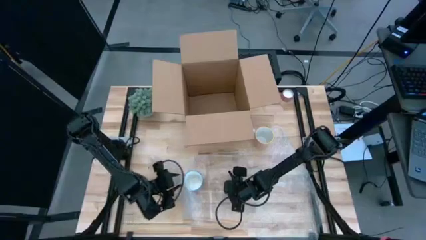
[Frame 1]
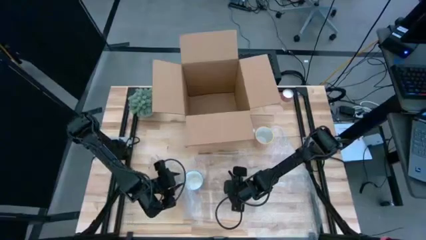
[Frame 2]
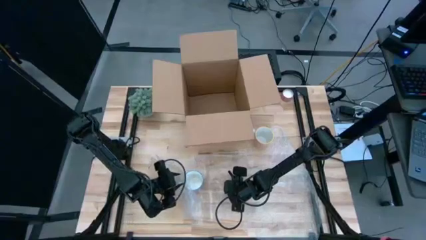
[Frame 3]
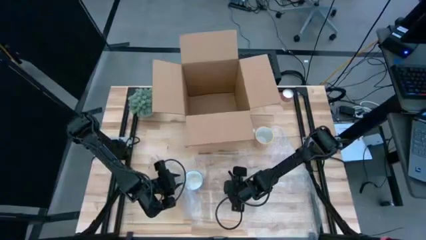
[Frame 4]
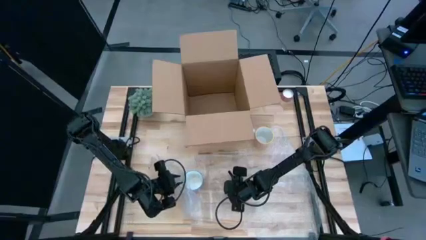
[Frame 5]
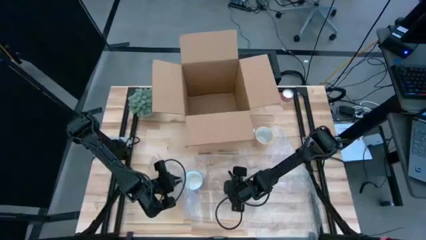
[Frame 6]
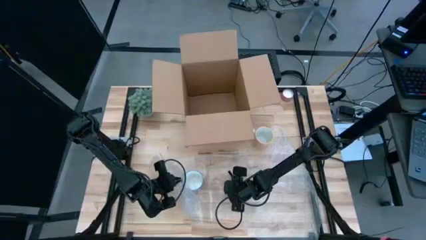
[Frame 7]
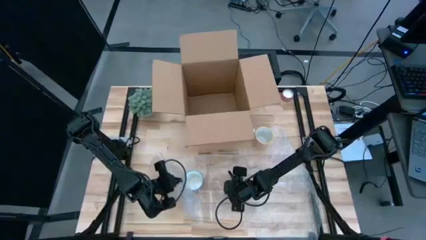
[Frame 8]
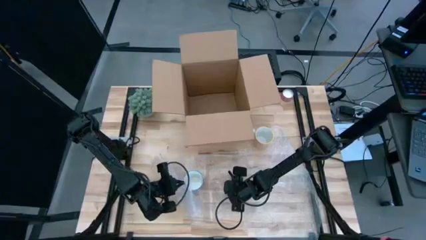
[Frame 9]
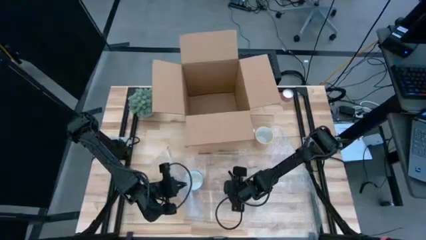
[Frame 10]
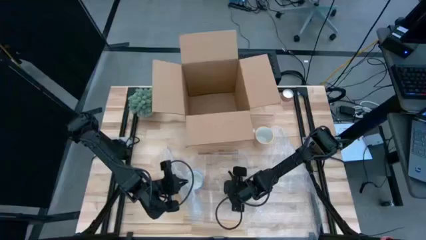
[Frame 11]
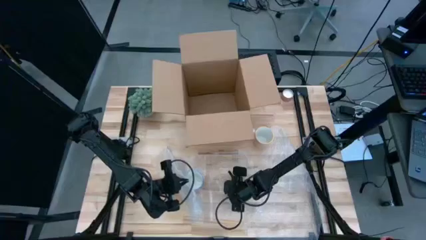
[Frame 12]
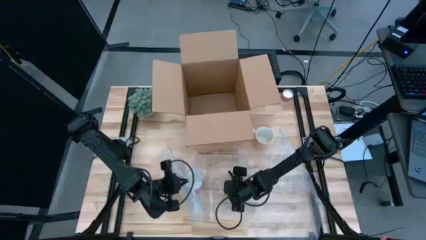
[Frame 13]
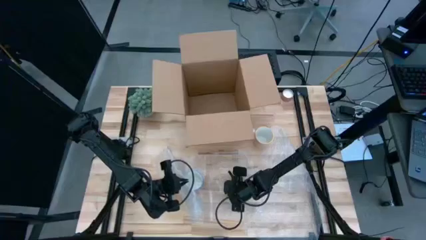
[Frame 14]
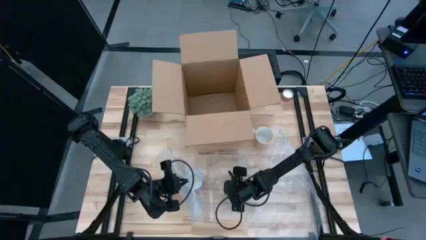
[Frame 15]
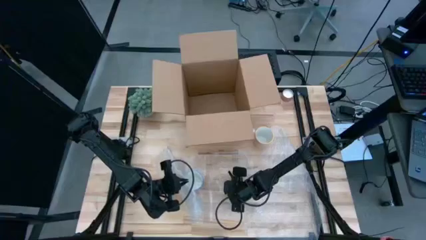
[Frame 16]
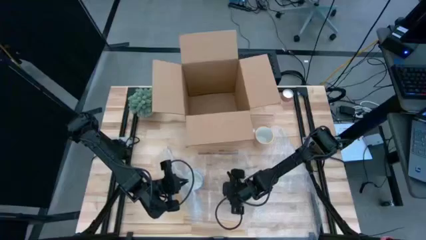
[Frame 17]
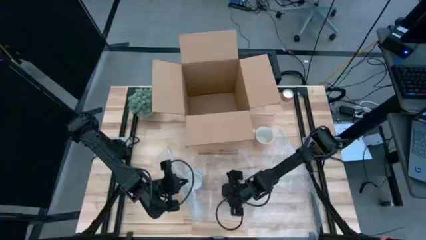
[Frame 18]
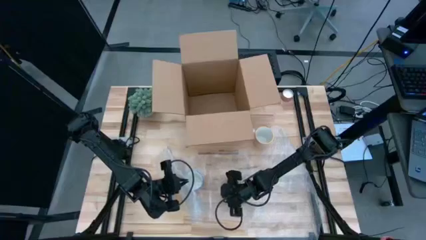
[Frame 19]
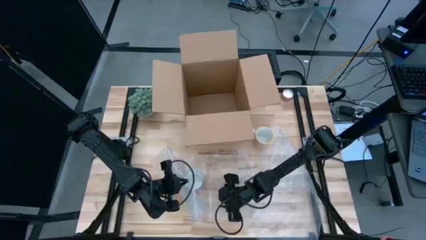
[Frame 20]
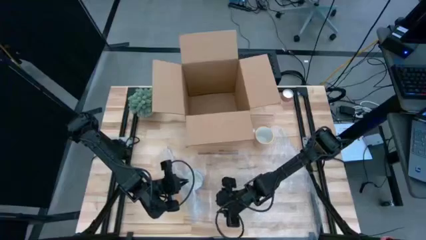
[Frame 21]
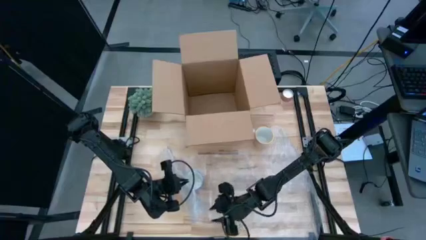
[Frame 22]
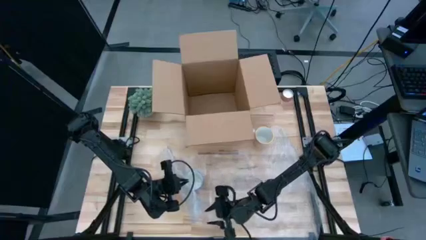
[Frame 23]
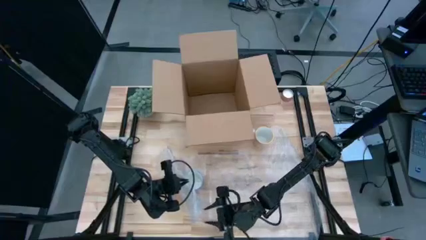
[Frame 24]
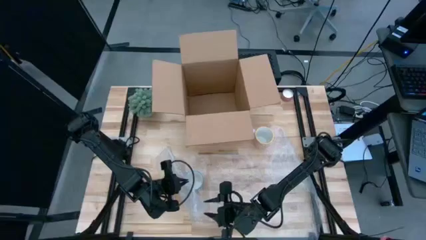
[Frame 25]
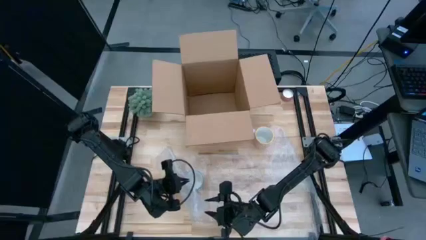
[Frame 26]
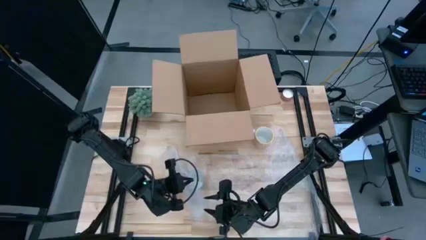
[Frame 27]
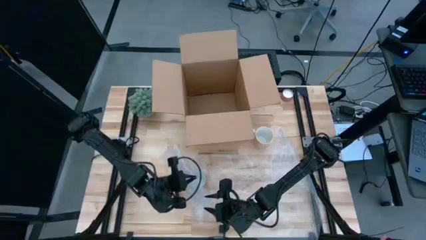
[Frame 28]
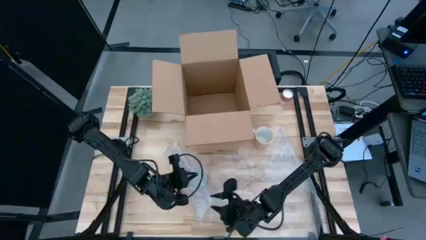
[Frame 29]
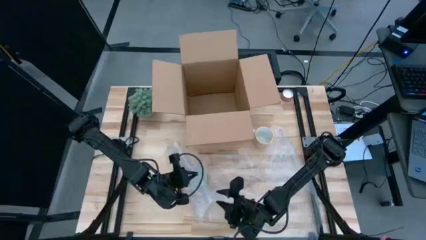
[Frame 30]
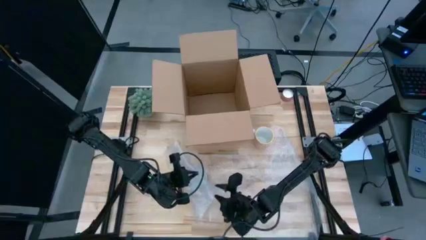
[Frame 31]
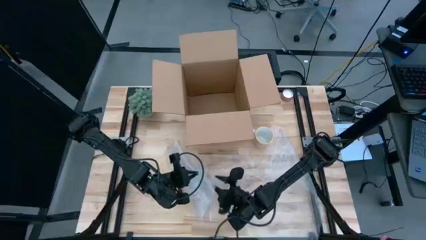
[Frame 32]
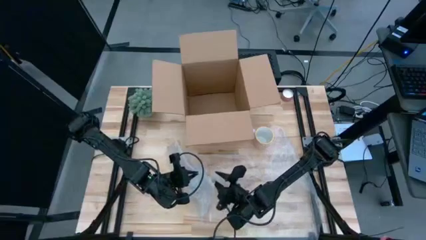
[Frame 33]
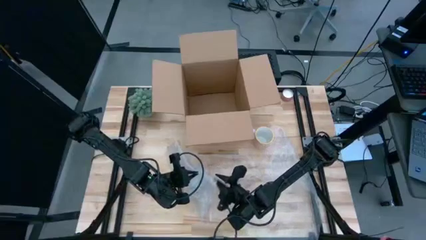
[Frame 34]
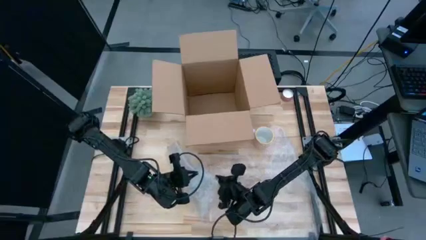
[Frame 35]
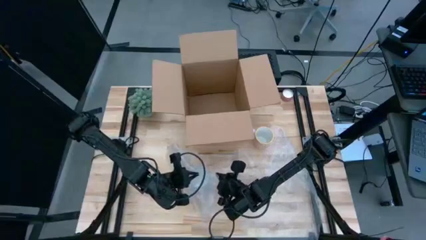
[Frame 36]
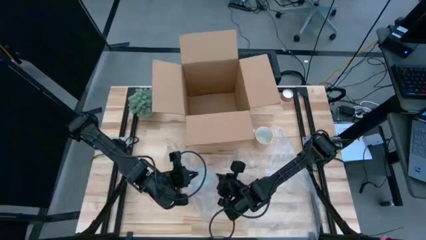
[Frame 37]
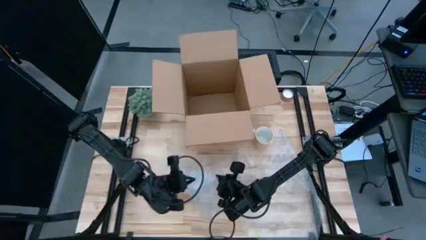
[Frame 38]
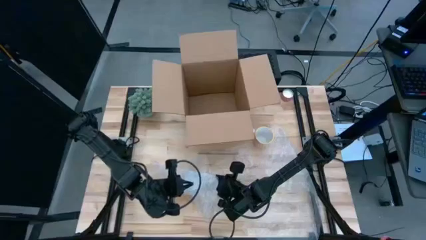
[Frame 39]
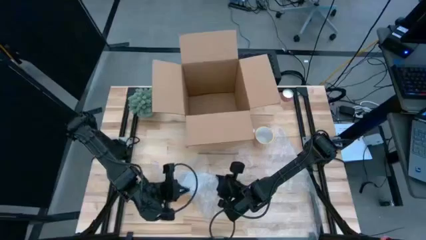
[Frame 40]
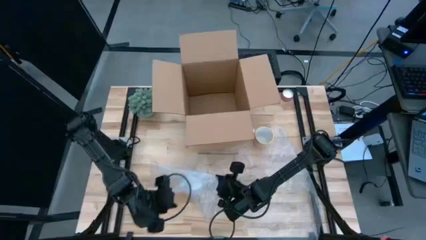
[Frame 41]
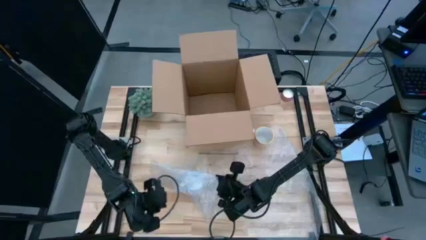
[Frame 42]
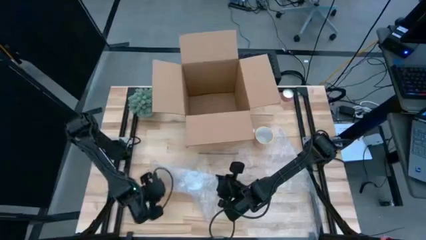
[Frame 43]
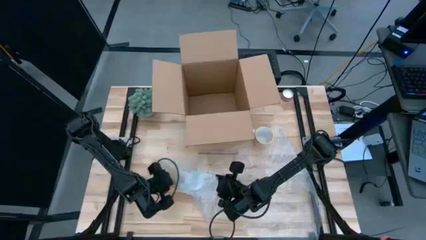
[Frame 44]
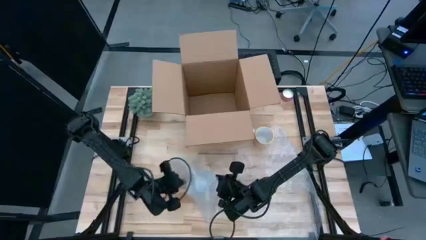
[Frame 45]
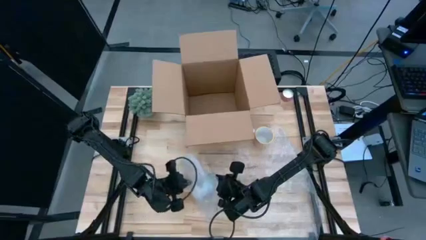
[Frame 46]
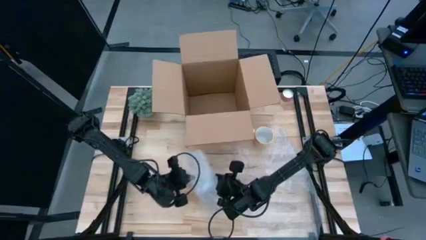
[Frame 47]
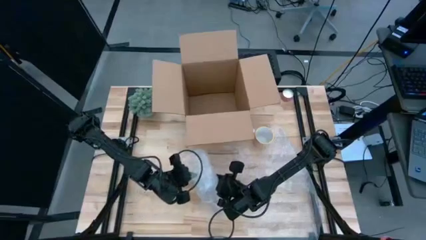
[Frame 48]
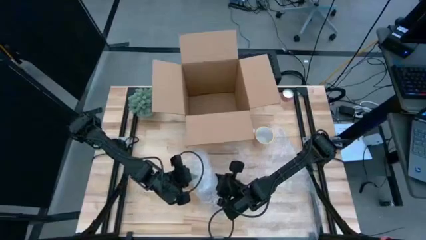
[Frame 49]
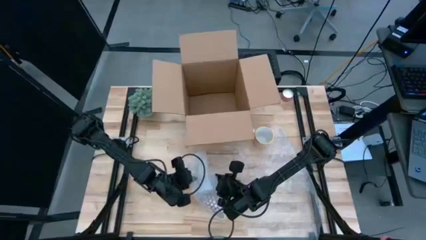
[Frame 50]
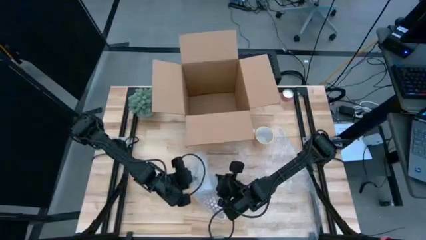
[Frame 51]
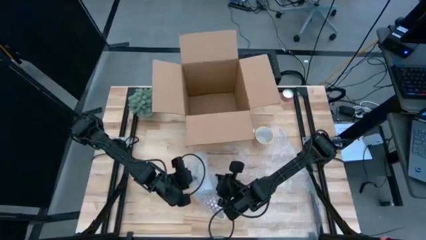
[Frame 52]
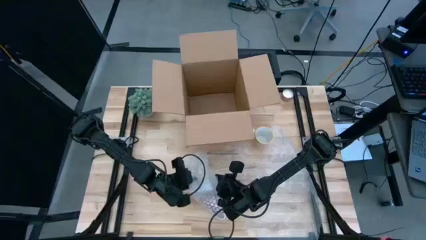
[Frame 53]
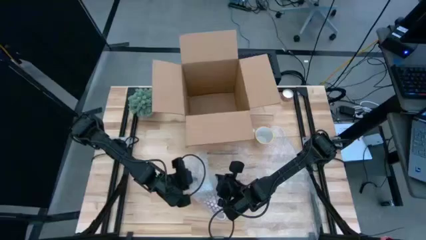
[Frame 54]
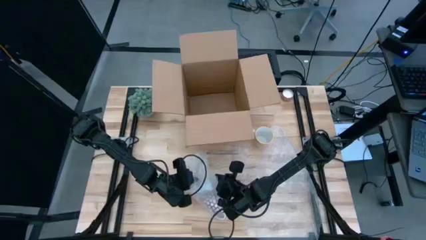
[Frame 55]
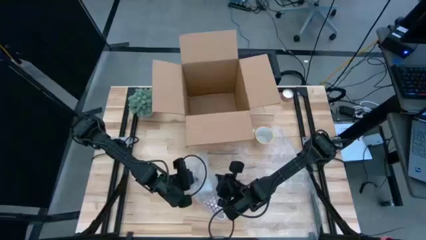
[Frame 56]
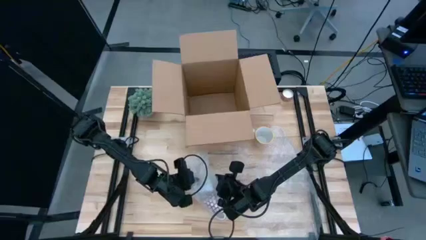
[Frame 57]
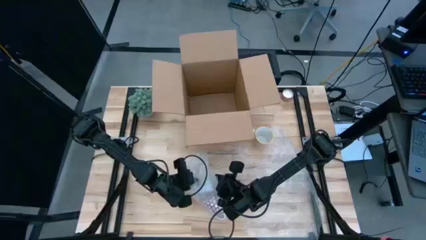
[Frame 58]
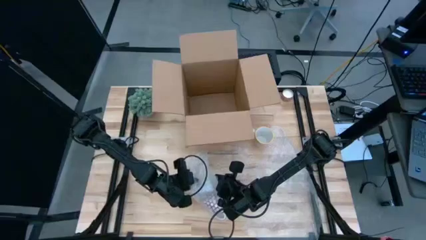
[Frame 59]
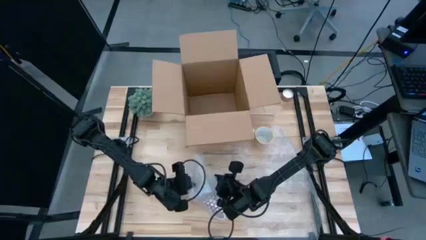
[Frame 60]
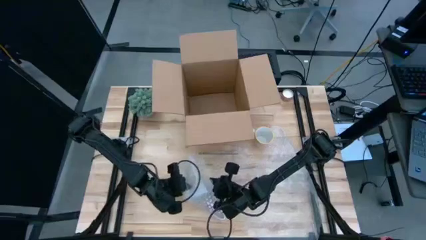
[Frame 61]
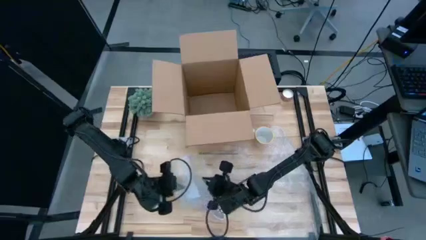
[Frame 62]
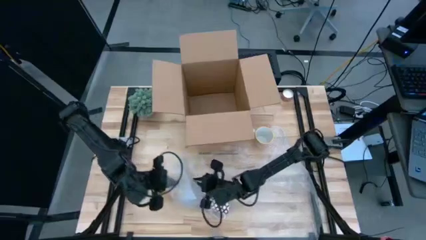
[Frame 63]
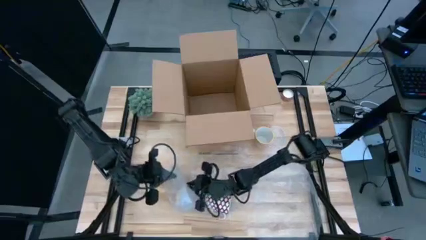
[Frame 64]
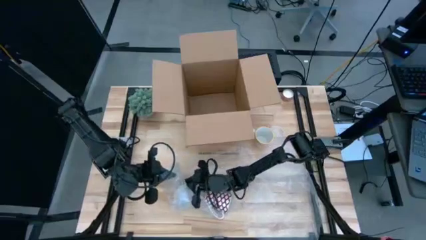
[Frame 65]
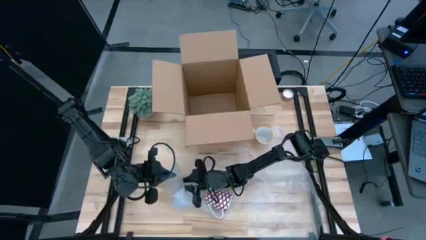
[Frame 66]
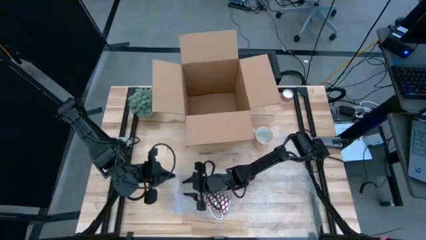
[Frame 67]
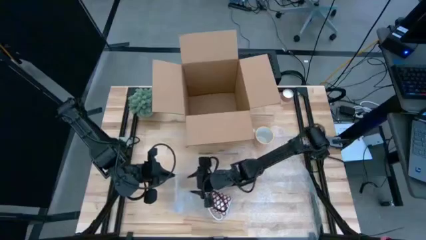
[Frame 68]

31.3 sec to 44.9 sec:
Task: wrap mug
Wrap the red cup in the bubble wrap
